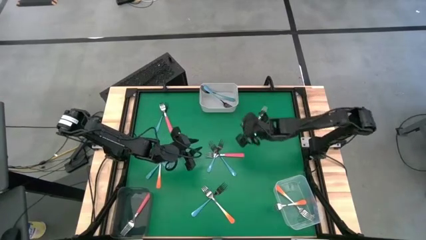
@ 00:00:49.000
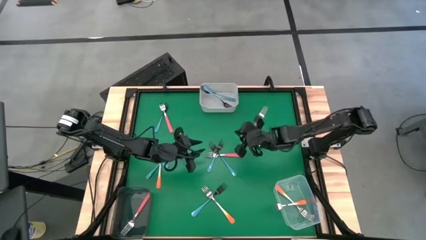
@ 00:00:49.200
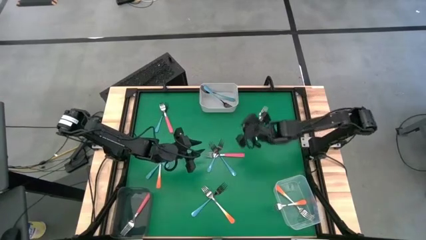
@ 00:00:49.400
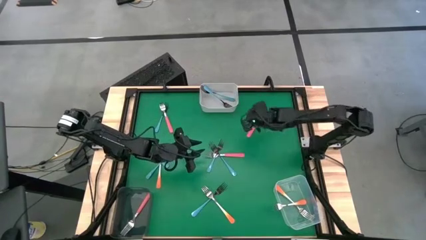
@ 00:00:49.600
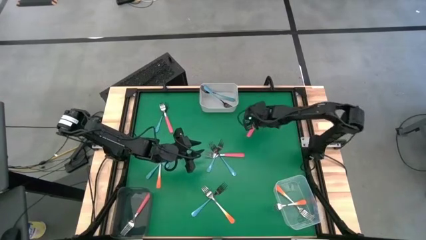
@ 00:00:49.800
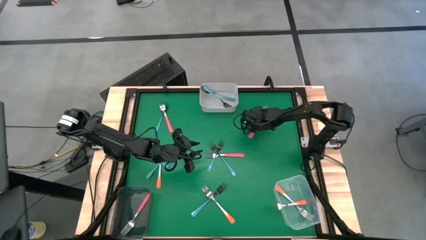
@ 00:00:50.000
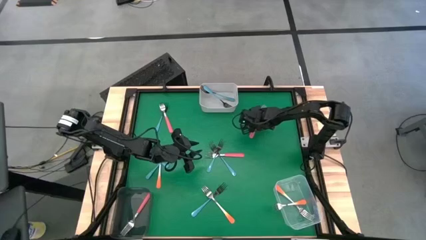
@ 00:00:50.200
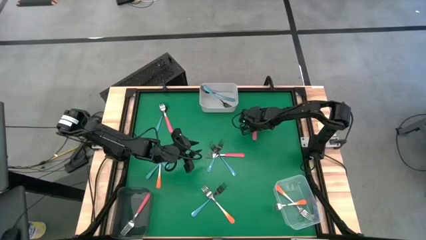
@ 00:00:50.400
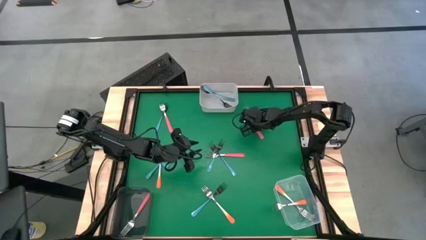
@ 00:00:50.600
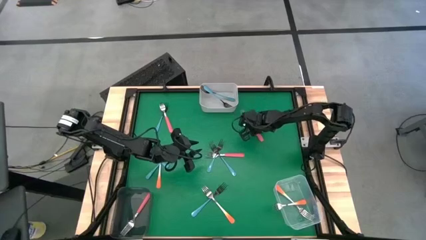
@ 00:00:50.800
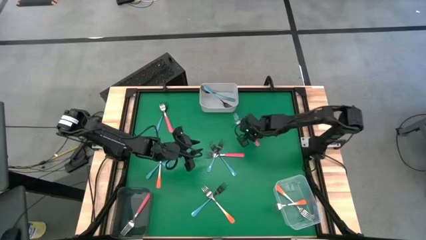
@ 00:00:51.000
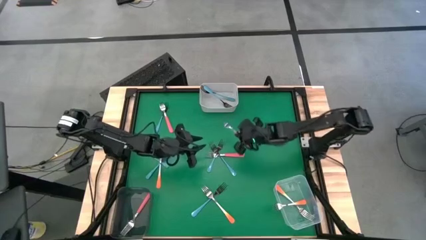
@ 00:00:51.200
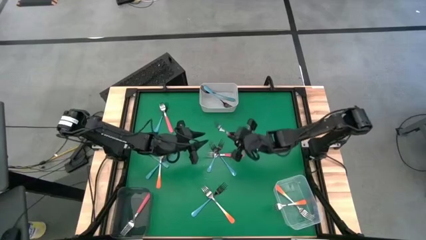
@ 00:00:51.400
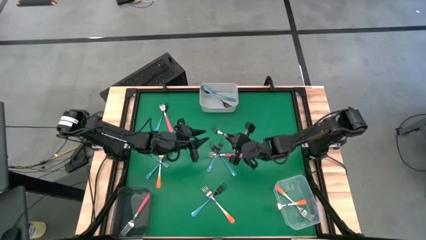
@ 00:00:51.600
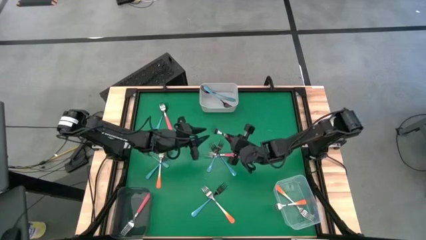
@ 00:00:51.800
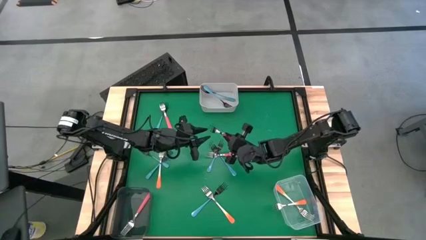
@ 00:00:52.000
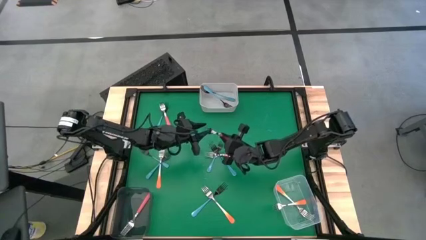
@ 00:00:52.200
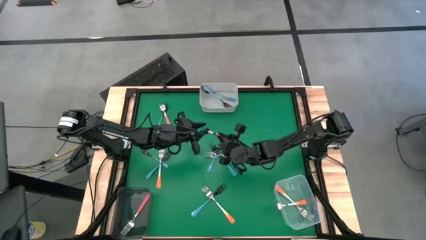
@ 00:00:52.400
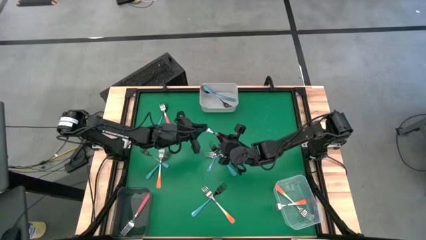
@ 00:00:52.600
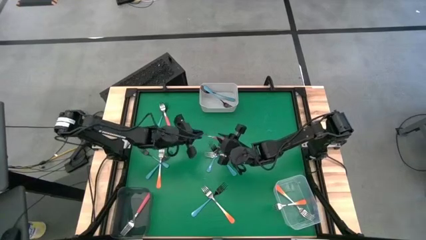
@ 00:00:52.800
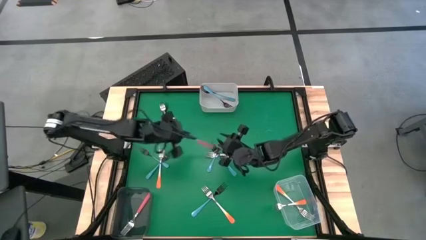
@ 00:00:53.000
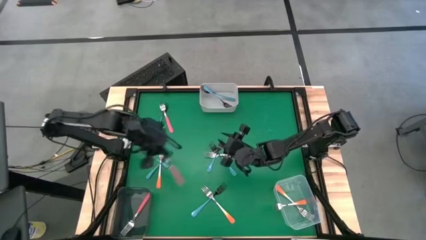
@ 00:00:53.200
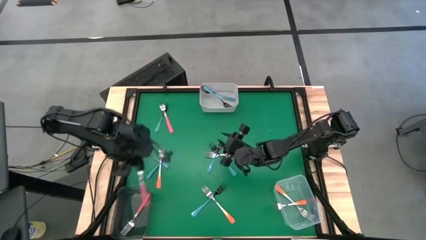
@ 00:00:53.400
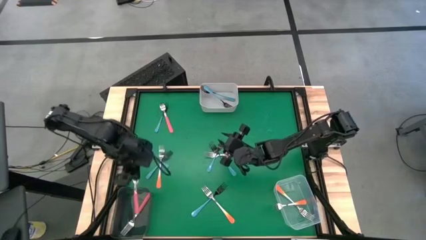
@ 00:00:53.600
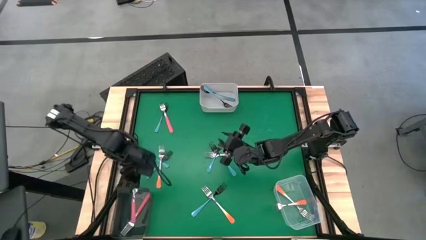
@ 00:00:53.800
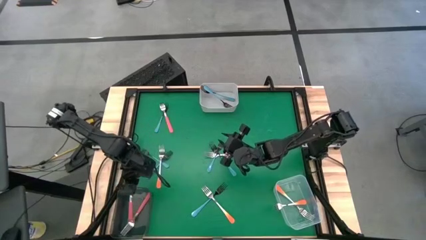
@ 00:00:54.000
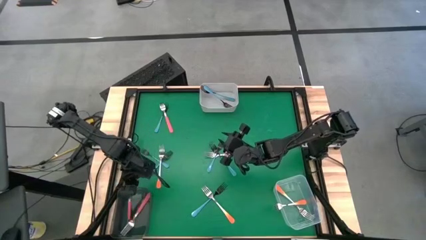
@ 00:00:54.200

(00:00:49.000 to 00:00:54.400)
Task: Sort silverware by color (type)
Put the right pink fork into the black bin

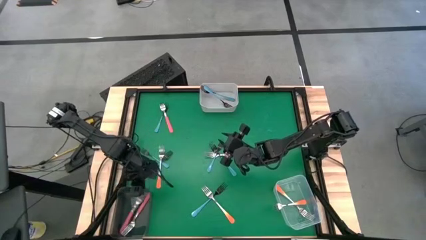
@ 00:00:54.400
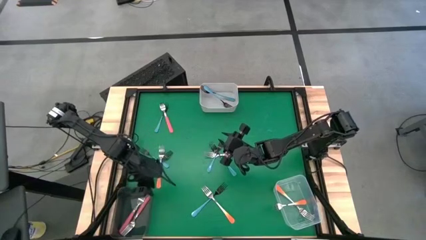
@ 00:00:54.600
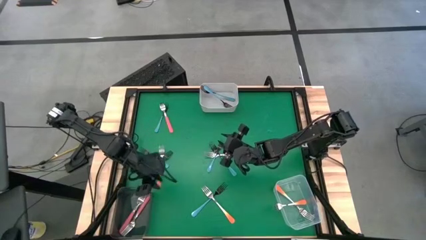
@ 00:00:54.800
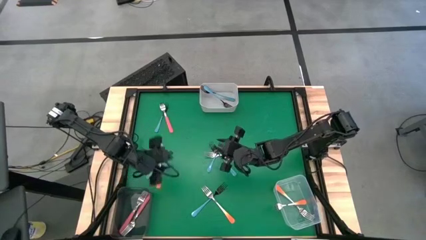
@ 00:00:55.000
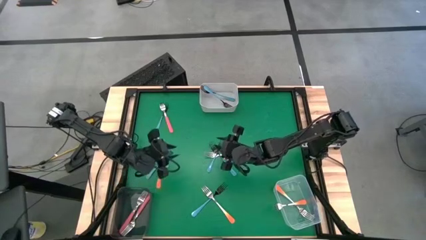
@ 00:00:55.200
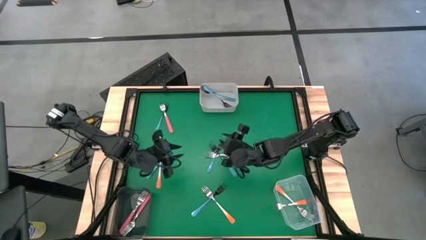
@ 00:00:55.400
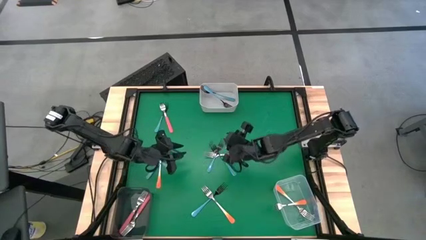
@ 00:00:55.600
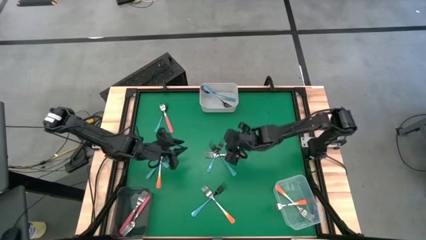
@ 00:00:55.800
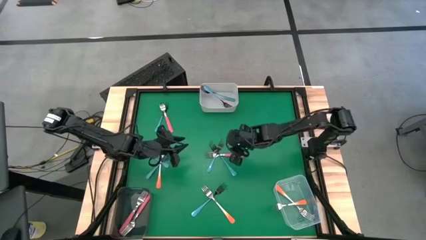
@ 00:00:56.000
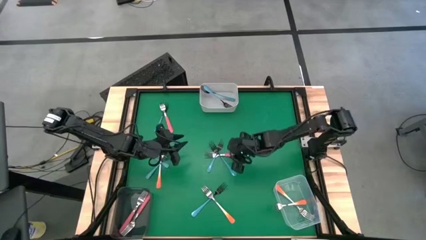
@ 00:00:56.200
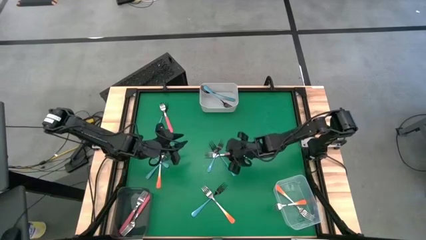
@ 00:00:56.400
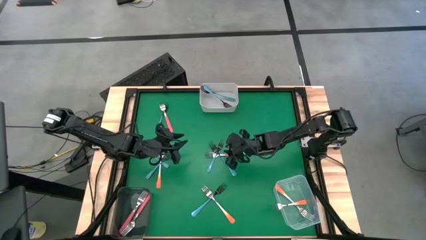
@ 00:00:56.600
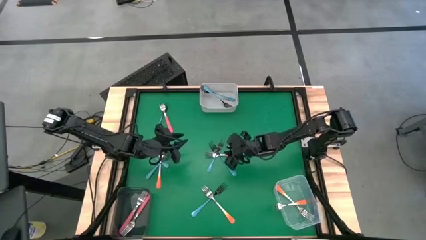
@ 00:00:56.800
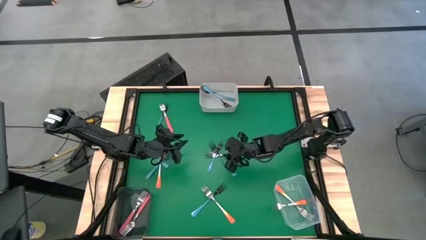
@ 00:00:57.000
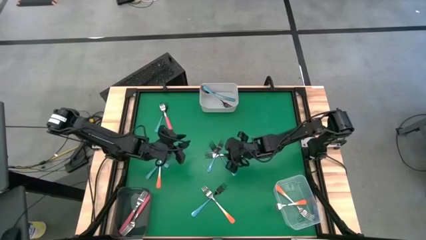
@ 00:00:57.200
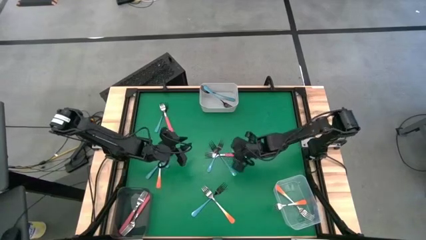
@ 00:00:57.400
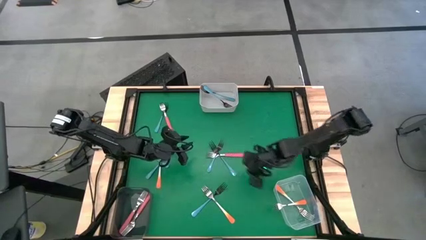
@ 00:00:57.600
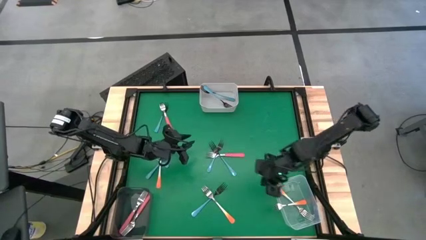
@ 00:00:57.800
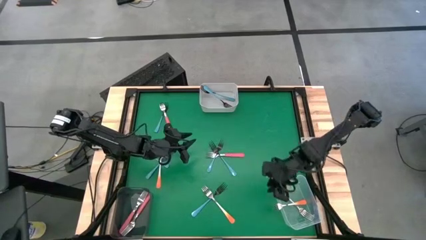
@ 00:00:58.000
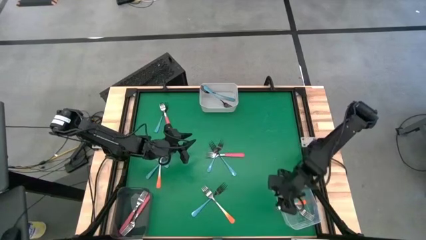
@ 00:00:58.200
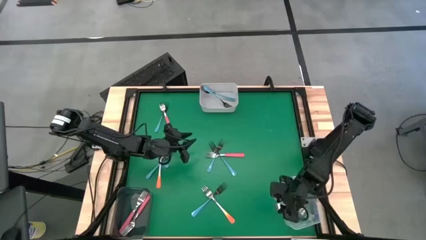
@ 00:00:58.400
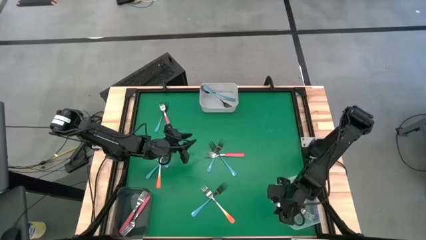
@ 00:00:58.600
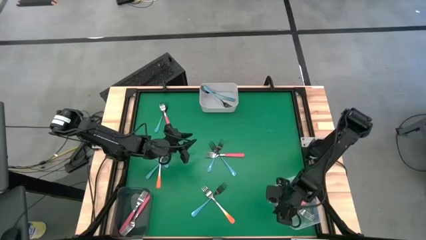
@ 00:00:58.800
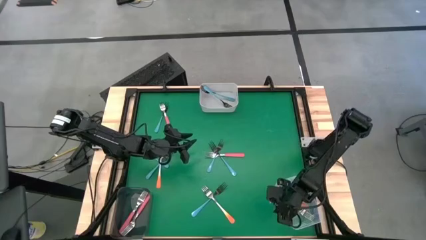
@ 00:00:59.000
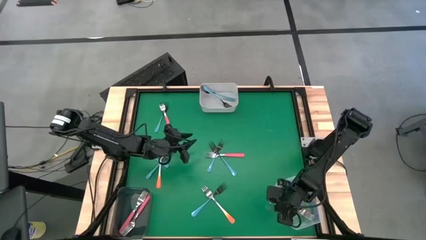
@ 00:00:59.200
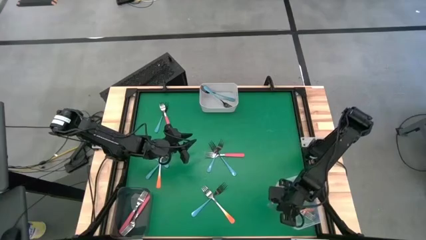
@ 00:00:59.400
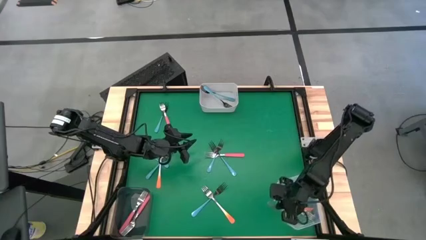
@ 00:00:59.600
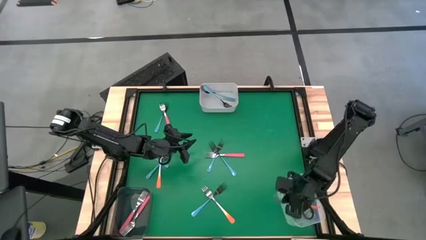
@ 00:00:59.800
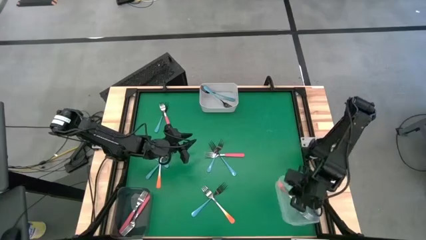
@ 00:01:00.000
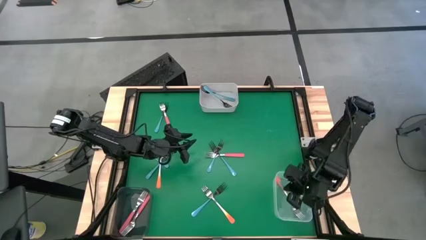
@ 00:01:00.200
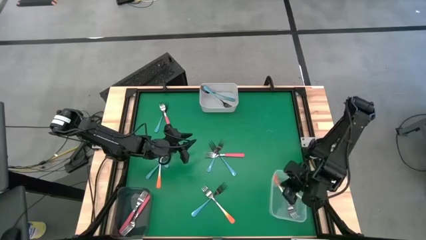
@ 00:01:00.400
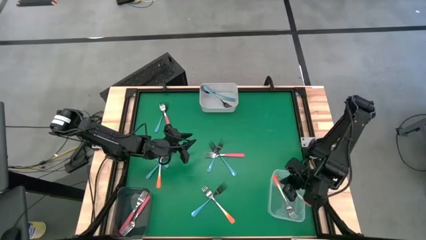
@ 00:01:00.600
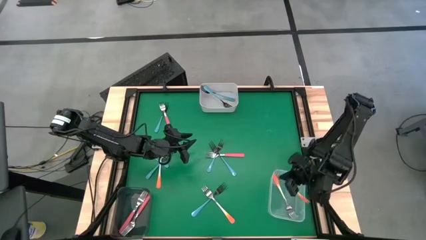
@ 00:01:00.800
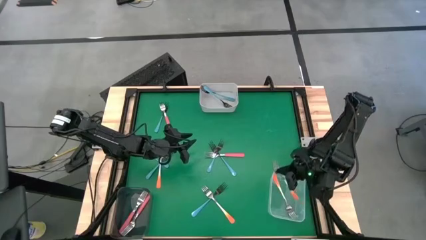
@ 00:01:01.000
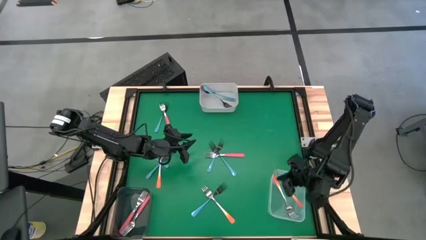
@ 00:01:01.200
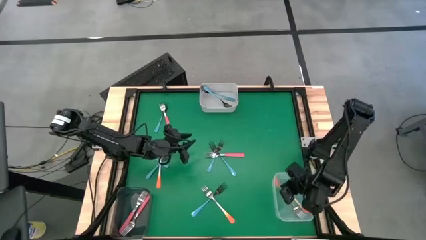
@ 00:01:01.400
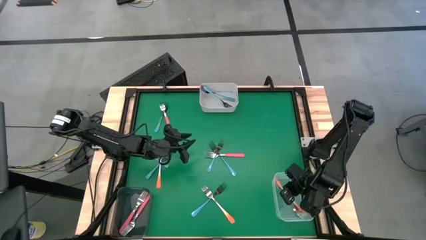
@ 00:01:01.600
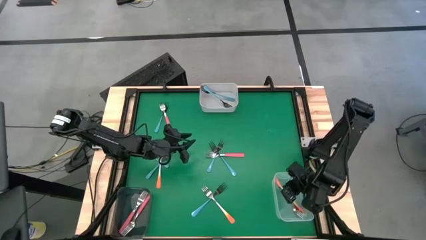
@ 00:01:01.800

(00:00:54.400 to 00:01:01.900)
Adjust the orange fork in the transparent bin

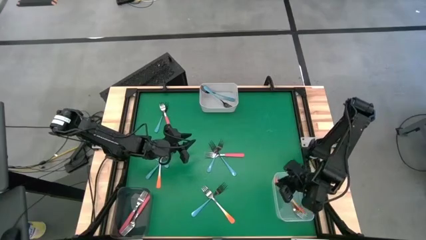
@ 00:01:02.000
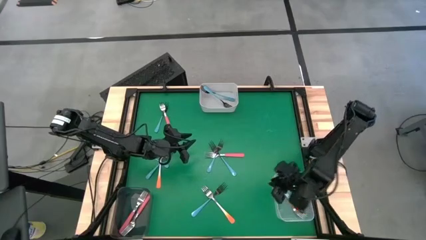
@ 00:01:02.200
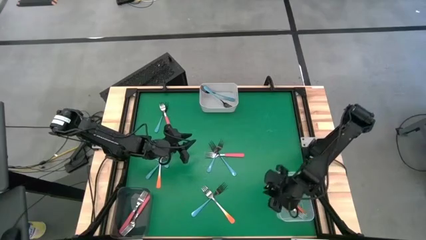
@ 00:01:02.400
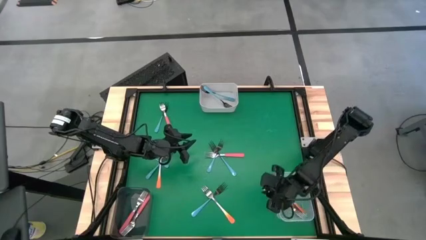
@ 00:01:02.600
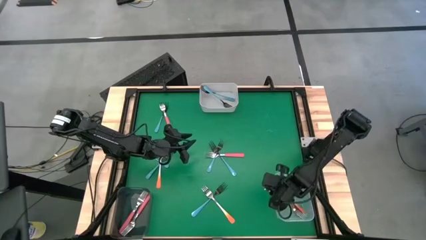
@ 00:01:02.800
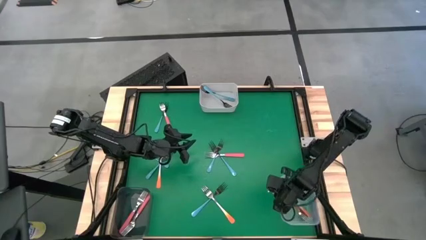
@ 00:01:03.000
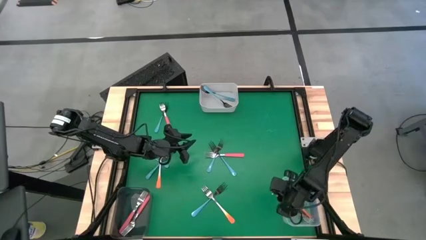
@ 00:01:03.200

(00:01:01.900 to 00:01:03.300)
Adjust the transparent bin

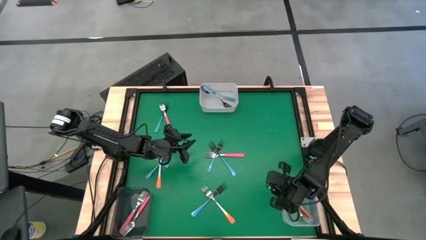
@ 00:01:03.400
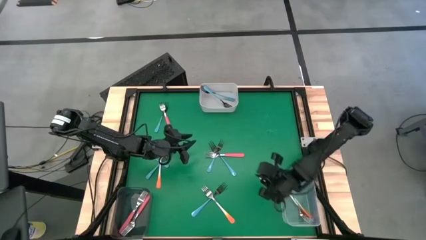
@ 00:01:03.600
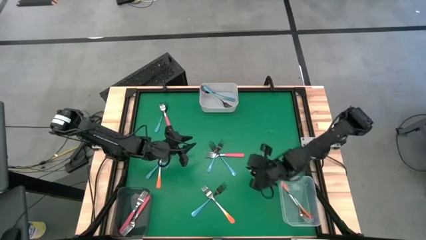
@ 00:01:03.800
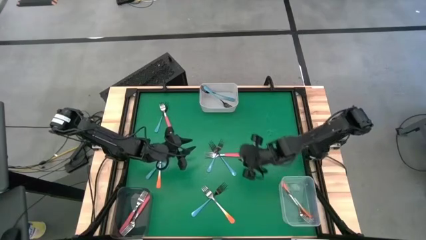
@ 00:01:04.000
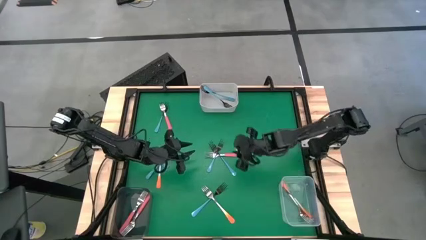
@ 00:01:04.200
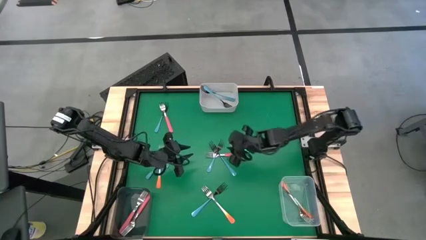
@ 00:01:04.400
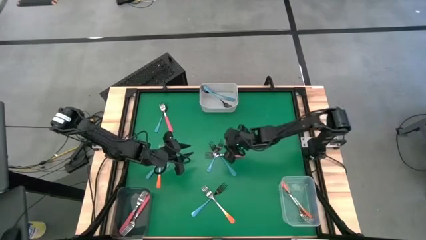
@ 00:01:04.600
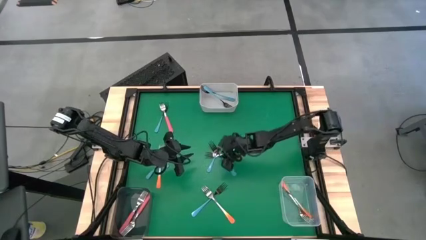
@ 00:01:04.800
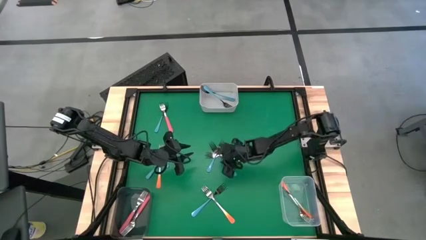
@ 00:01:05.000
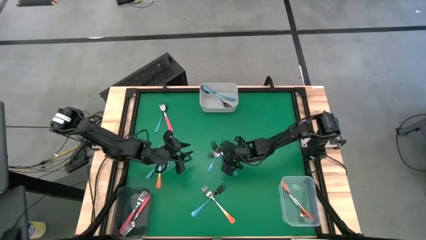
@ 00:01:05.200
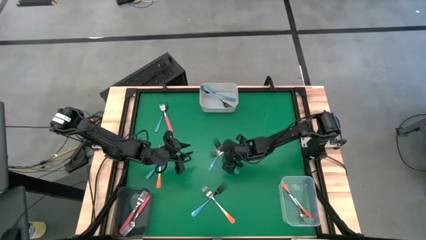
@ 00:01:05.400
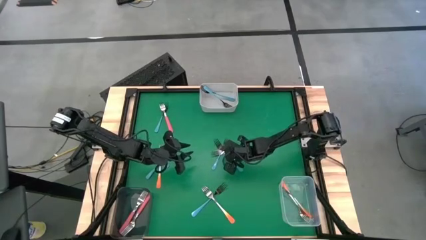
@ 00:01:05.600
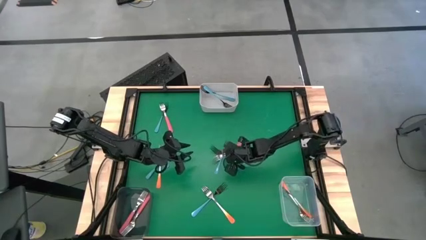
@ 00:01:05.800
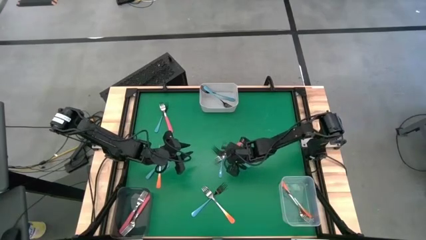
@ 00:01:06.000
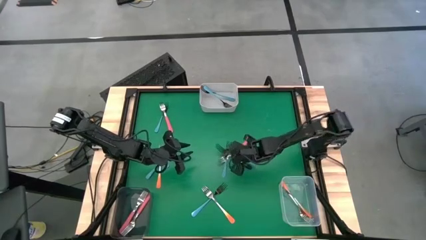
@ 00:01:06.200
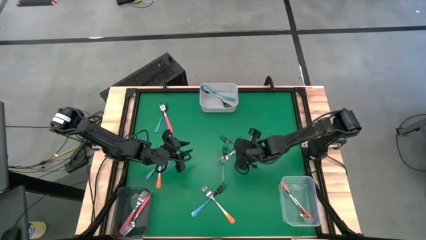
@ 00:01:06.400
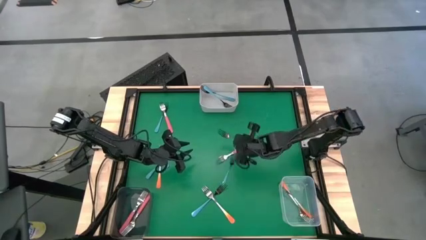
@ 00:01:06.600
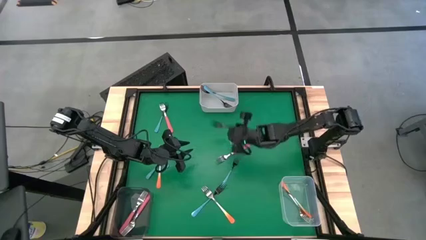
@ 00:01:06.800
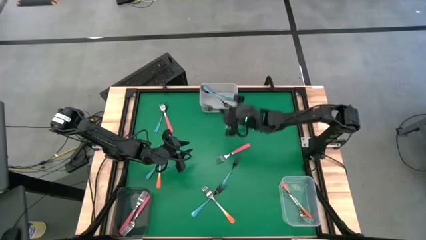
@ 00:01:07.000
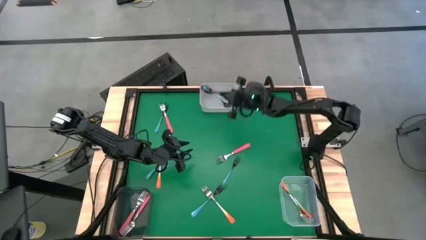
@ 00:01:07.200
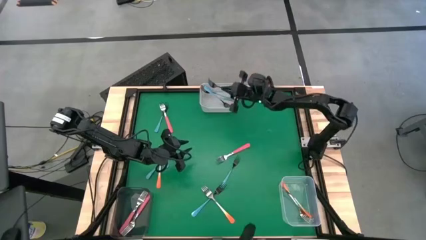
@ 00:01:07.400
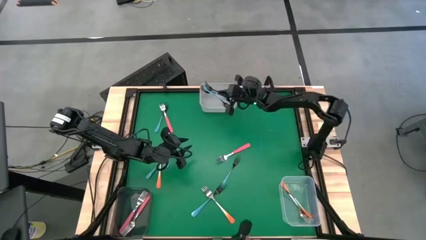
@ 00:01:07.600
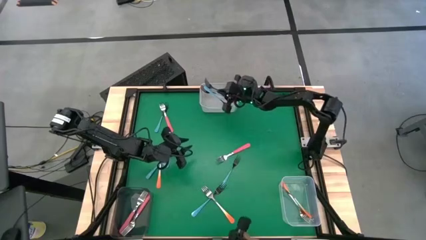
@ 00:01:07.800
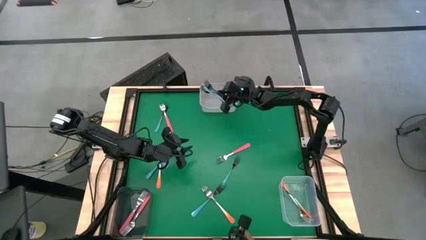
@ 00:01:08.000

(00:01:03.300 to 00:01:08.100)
Put the blue fork into the white bin
